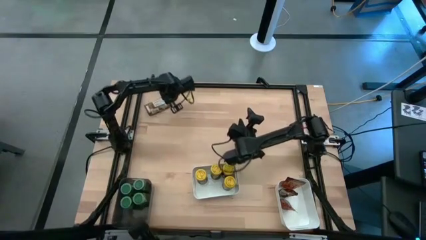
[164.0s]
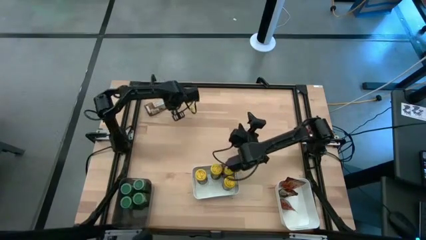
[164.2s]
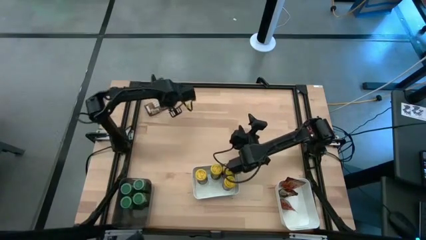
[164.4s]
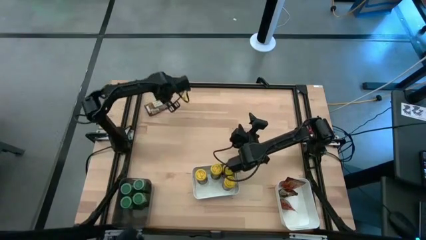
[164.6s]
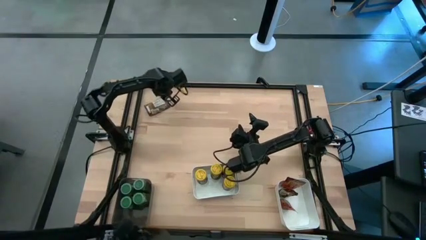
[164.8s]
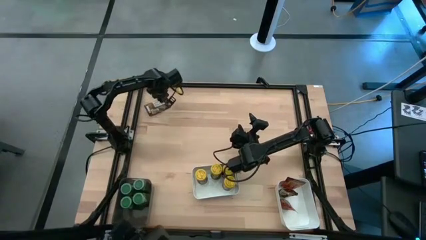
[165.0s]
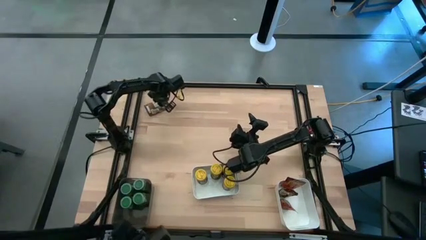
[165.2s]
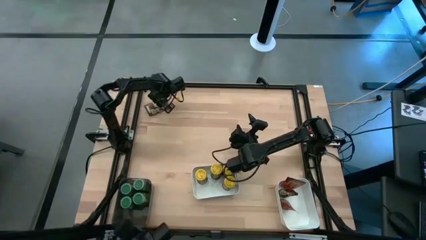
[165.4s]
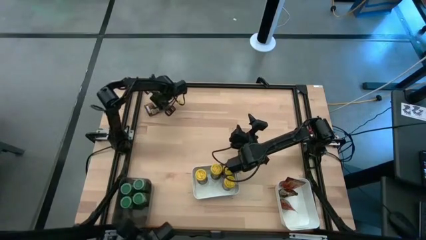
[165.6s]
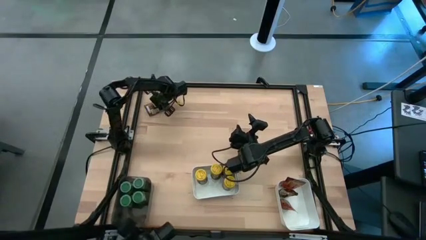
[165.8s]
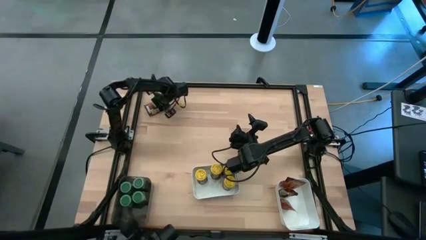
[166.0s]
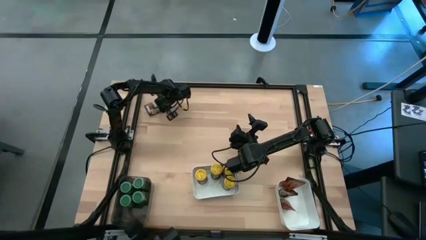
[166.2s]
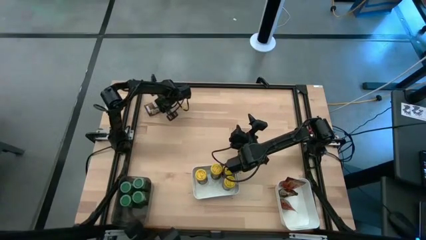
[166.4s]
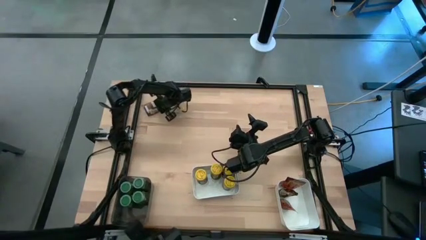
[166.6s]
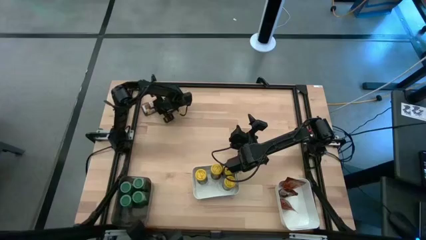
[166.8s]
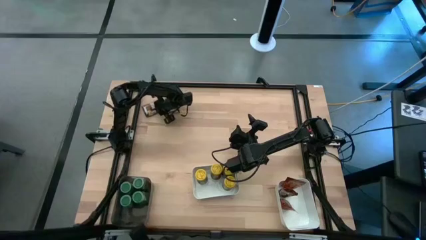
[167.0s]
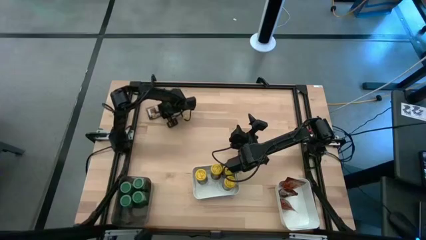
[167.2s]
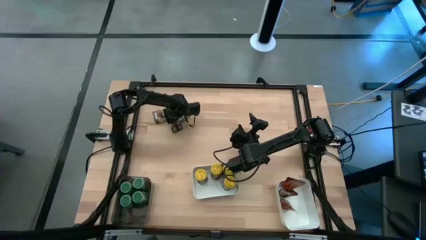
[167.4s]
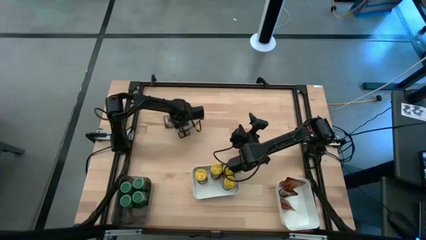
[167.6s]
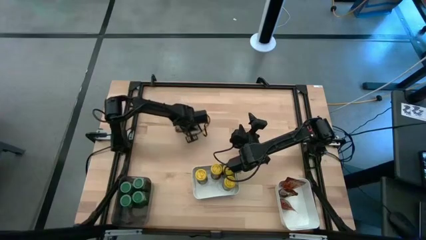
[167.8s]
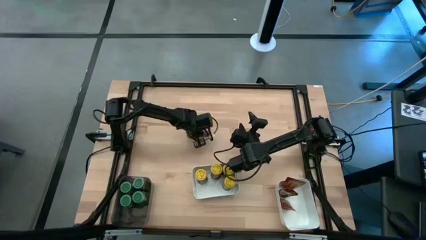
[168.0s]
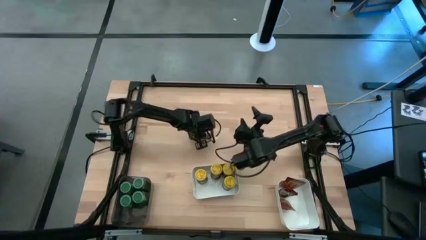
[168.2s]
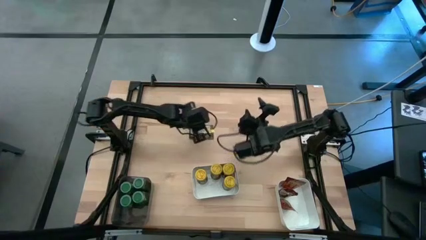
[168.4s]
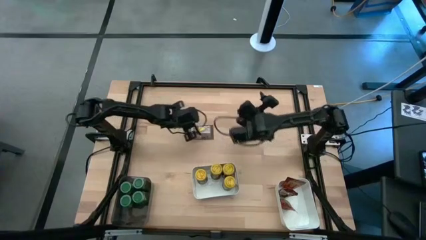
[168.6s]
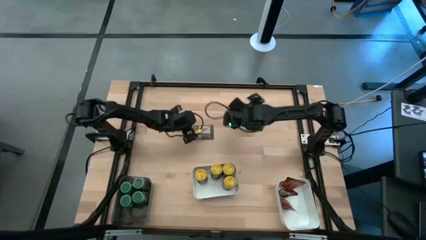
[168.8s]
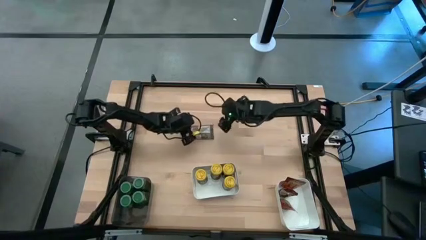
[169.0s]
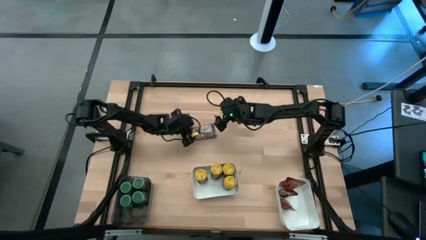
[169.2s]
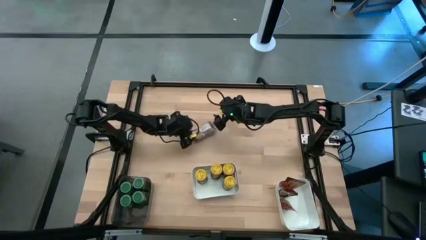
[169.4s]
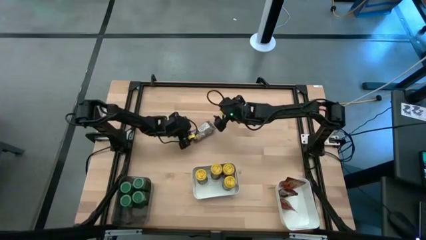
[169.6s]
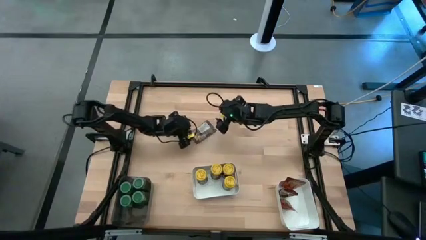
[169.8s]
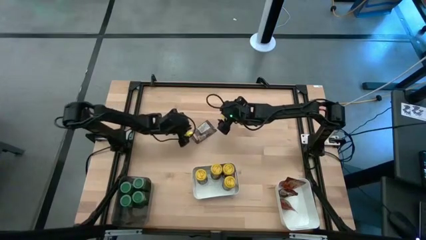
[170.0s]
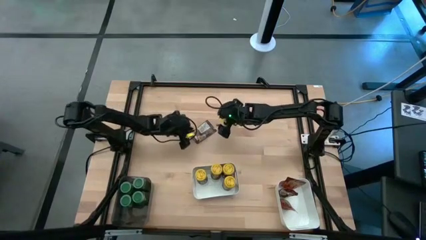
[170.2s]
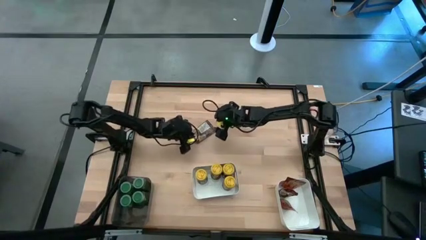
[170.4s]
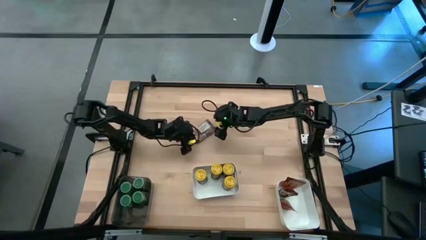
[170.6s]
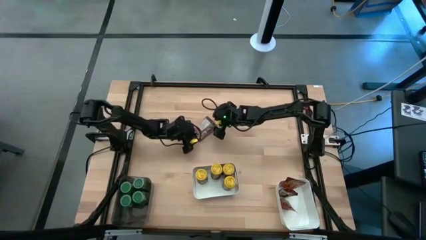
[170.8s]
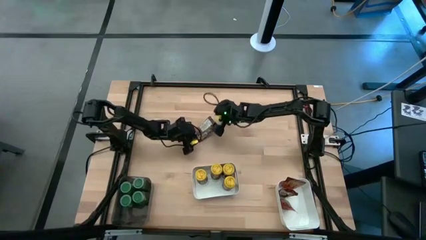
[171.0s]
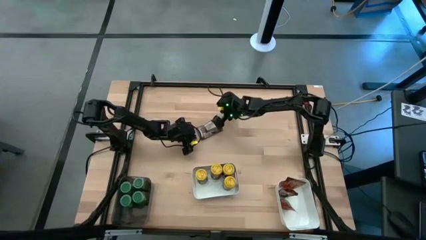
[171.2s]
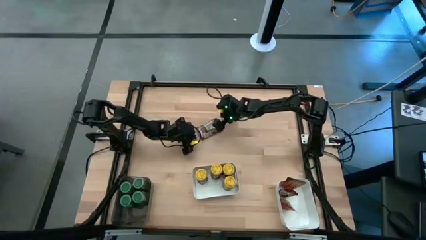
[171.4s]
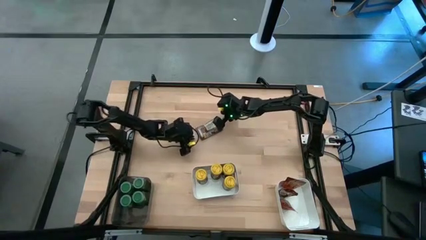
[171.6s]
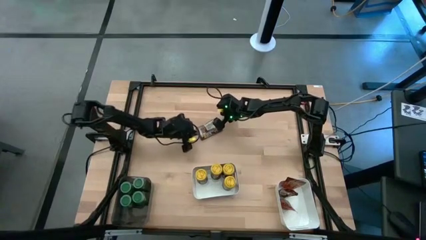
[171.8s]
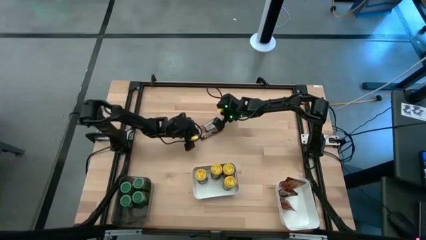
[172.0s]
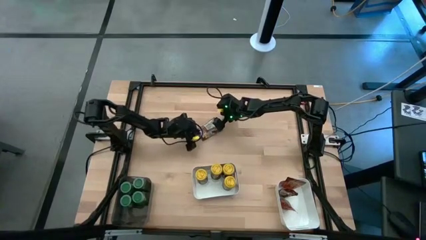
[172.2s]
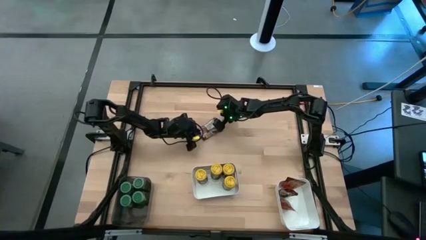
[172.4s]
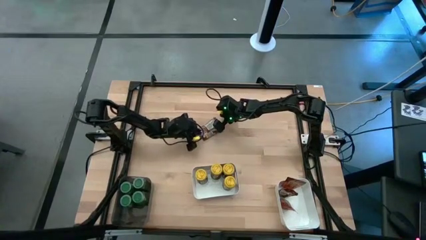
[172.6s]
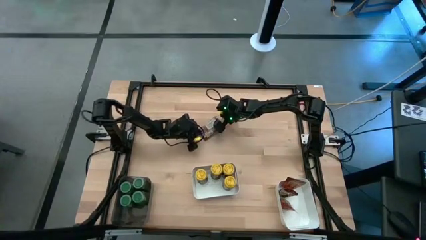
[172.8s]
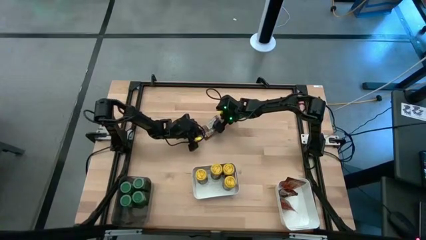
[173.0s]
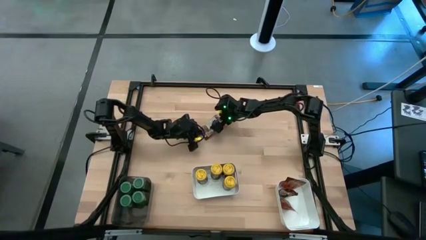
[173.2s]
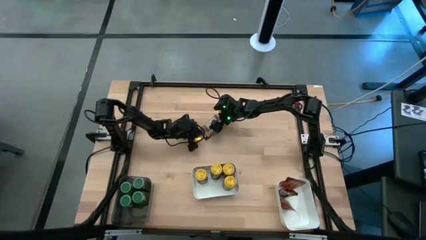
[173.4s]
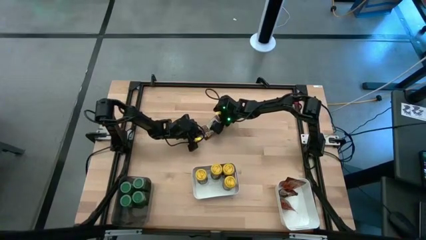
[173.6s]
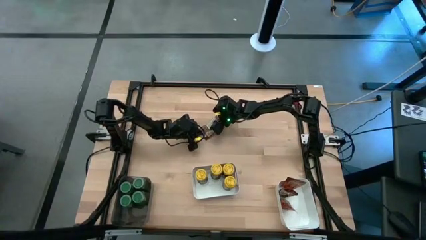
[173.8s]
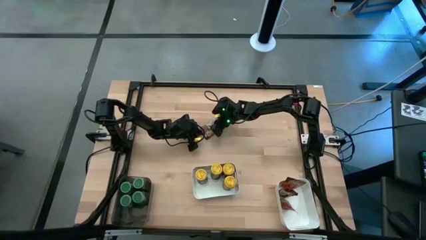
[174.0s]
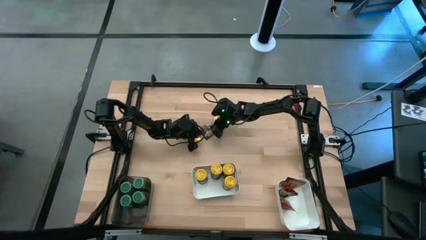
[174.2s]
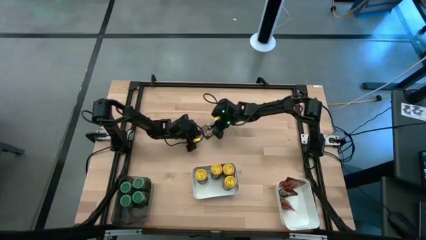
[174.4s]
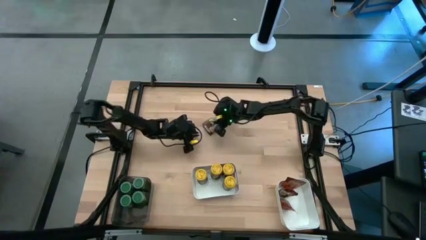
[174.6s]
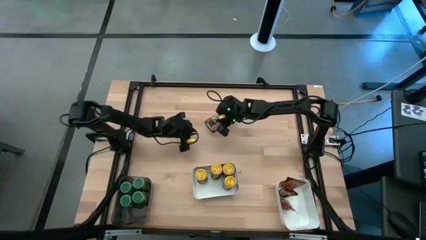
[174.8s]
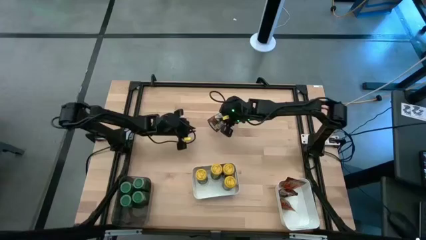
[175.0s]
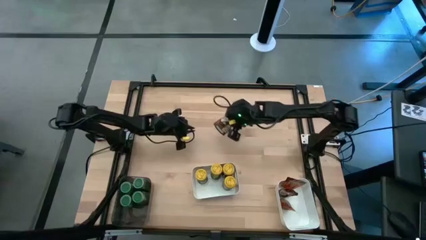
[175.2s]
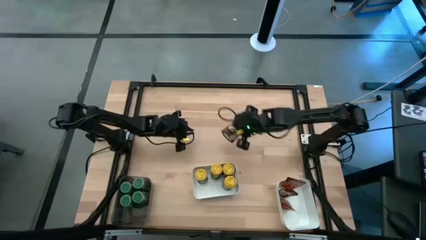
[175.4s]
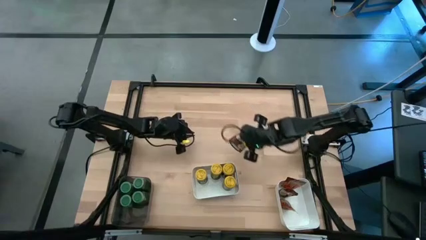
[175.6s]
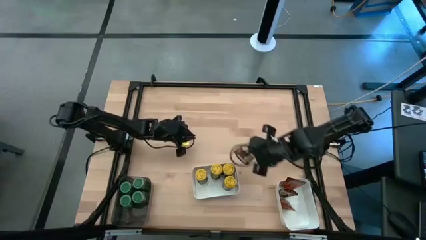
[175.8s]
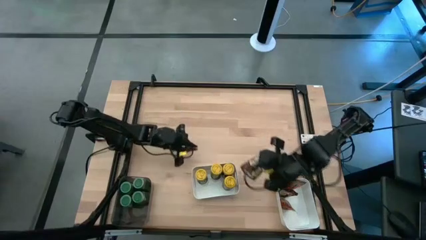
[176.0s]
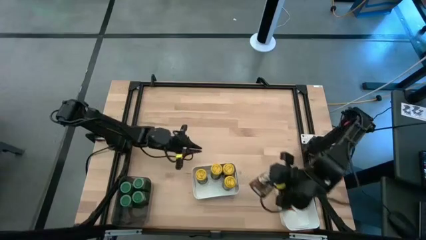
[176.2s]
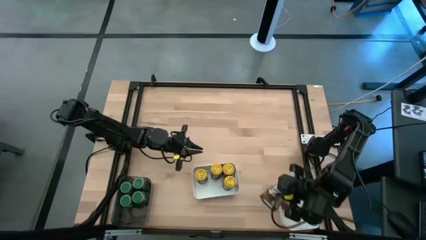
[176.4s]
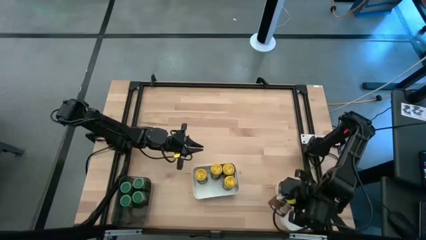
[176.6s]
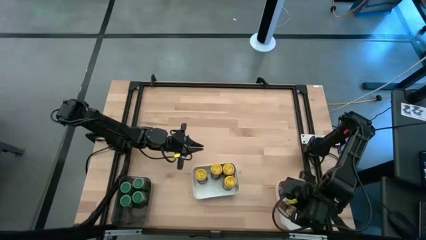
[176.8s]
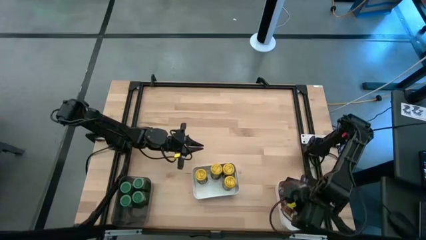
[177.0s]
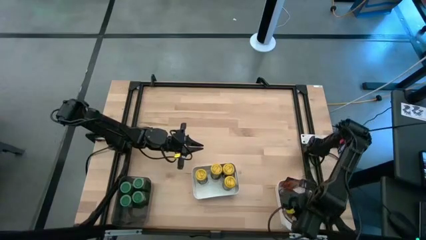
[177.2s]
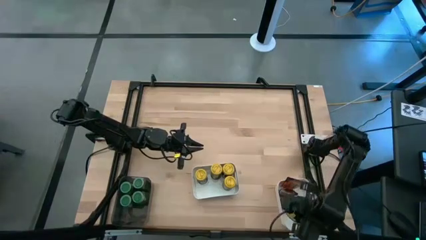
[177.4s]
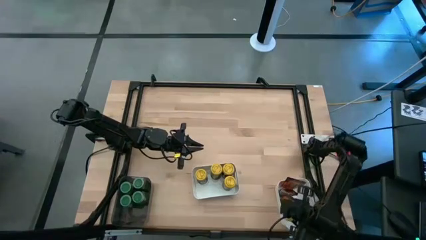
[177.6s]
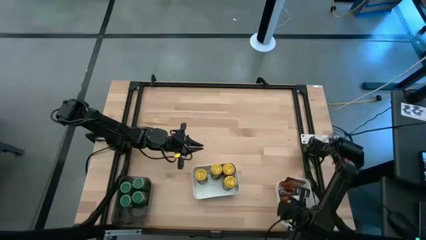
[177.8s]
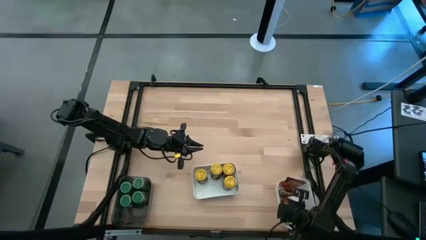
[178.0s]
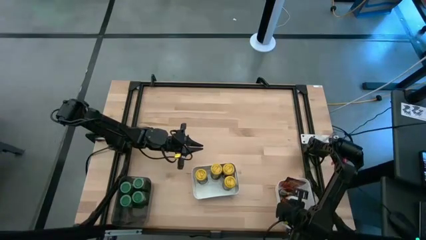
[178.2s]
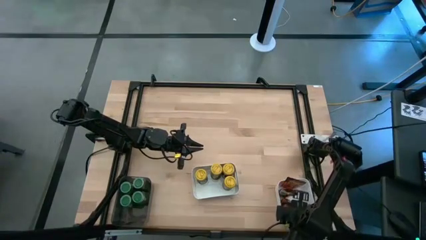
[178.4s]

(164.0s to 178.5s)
Task: Sort spices by type
Put the brown seasoning bag into the right white bin

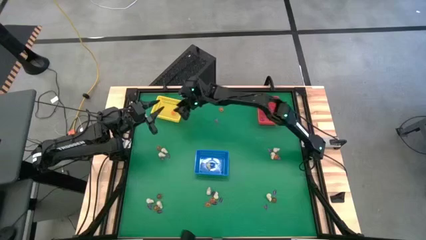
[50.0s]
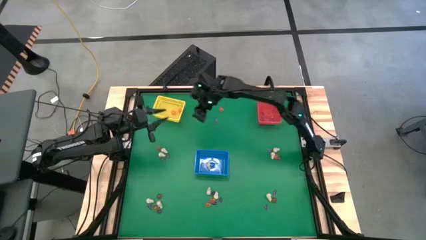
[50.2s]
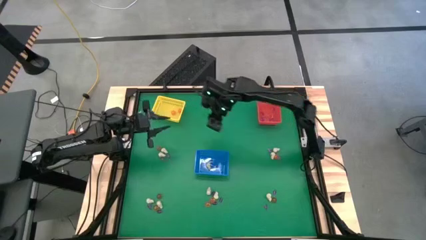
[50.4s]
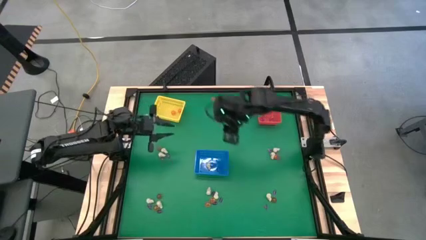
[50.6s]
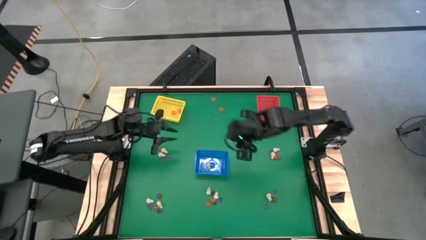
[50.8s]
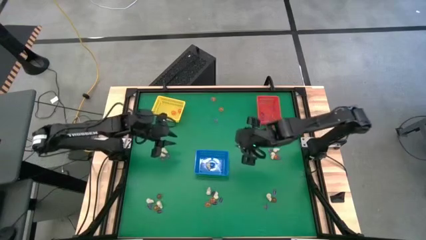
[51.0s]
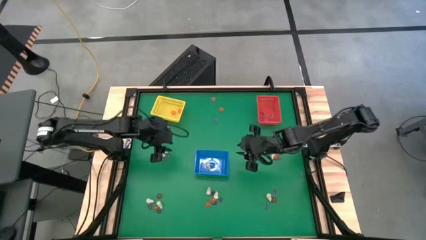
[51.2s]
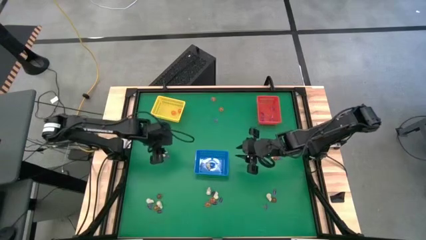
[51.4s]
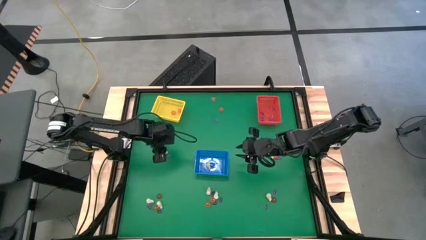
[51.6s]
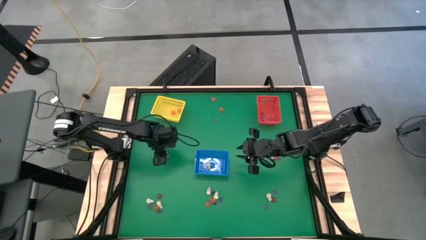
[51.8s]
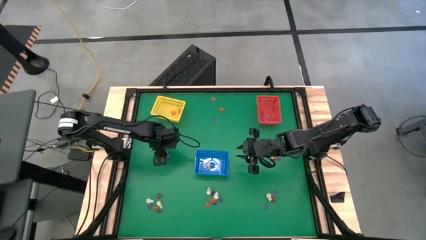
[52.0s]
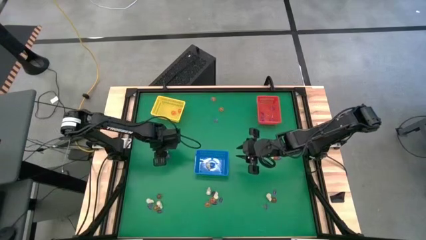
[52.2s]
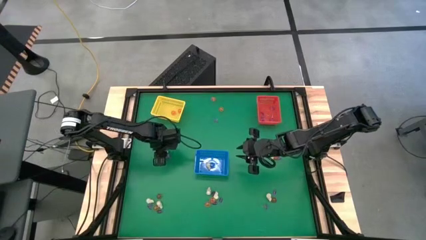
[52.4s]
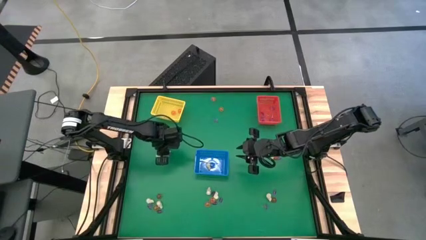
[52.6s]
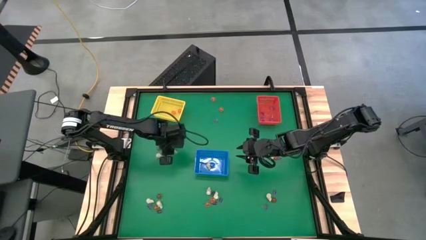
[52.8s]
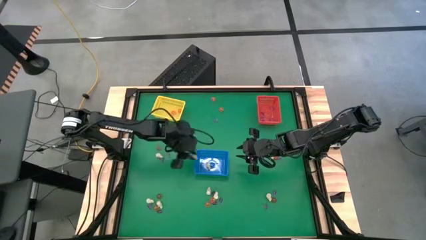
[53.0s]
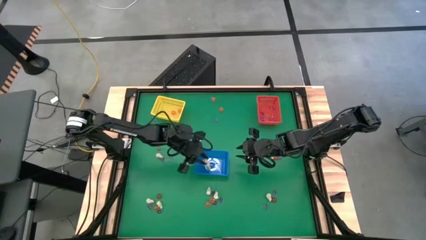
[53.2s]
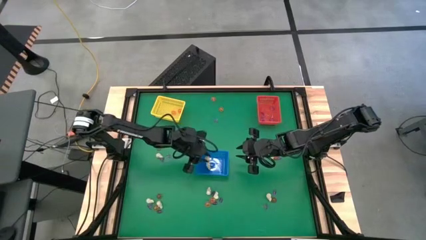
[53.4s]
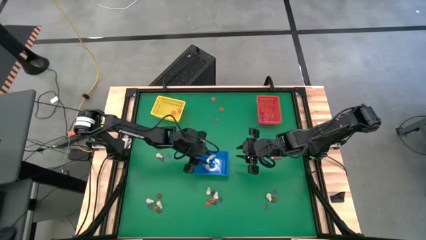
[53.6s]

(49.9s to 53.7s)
Task: Sort Halloween decoration
Put the white skull toy into the blue bin
